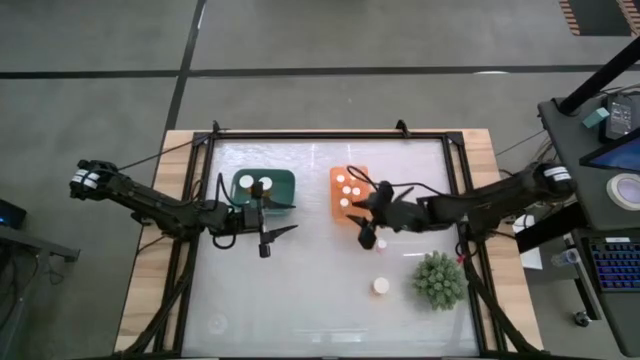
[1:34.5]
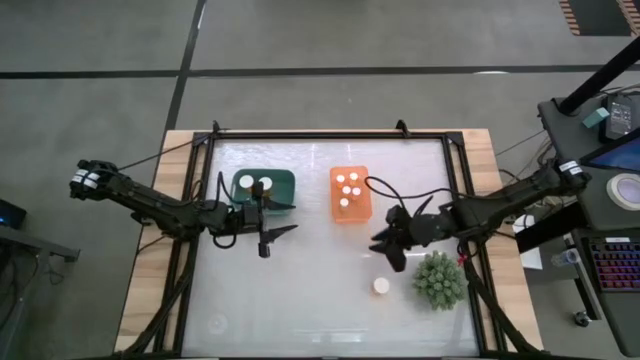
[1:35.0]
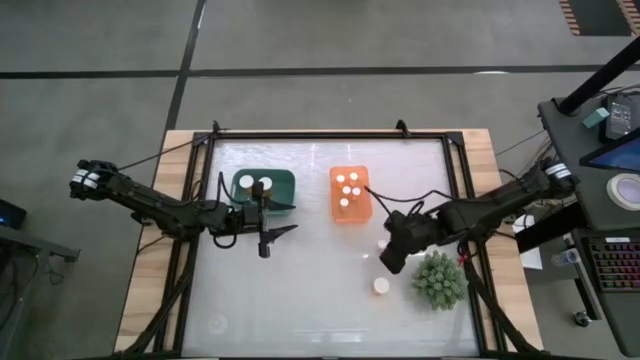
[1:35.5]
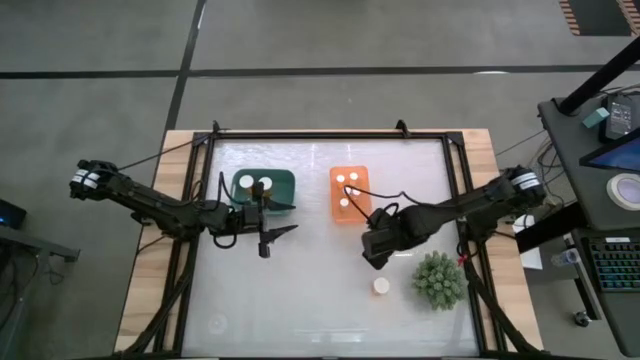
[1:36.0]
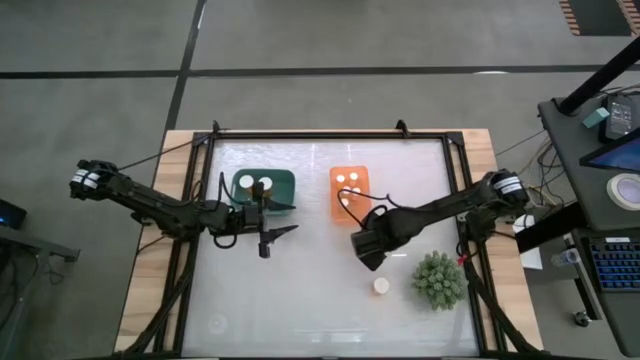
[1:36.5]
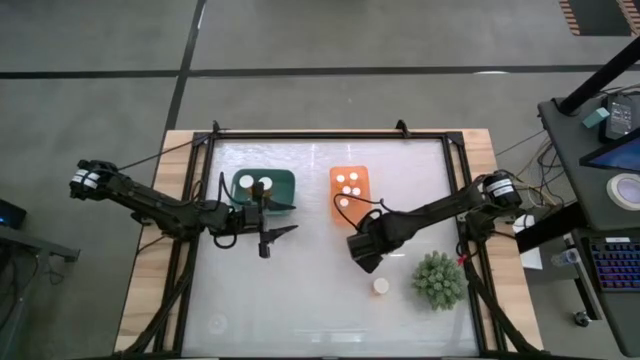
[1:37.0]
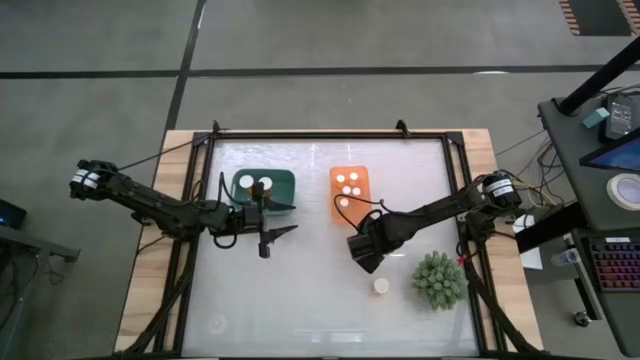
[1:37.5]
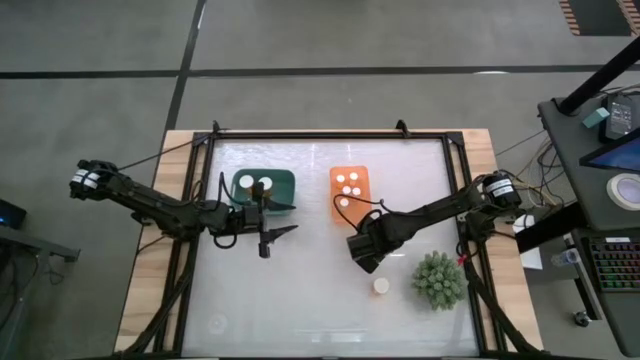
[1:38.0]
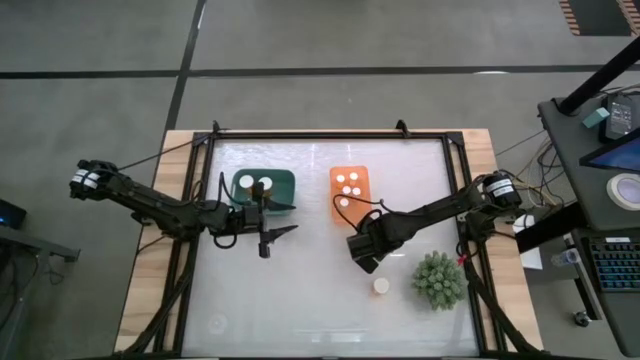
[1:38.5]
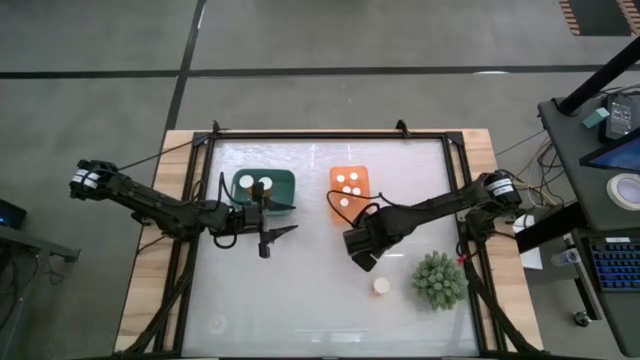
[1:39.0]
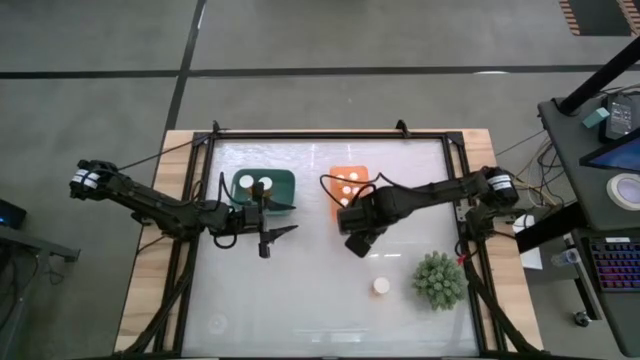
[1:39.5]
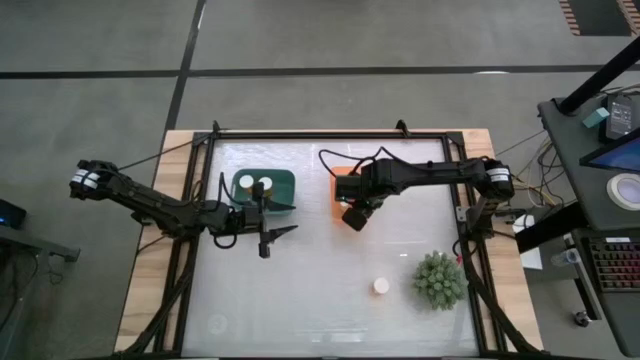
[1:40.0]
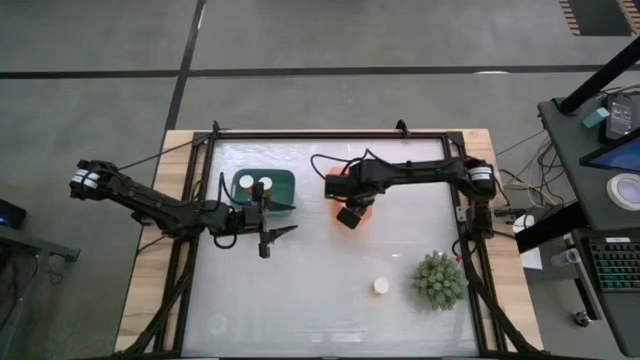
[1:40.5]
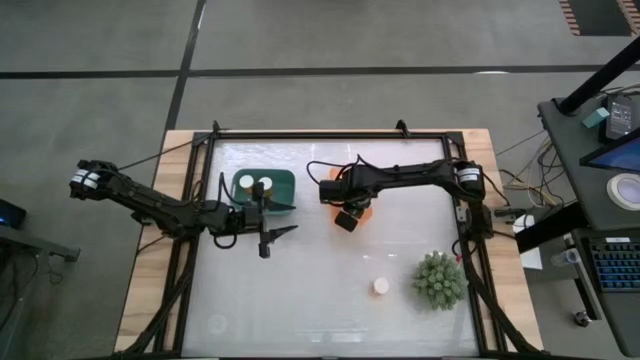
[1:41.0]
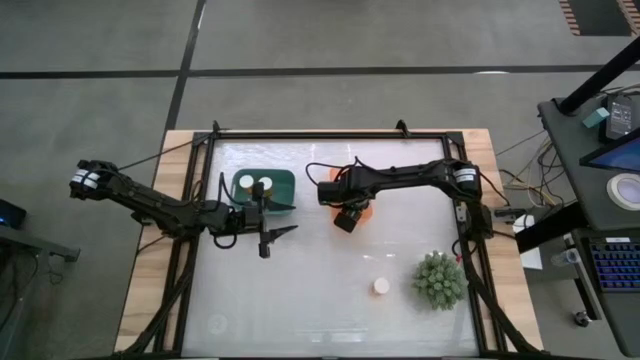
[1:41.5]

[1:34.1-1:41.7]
Task: Pick and place medicine bottles into bin by pill shape (circle, oval)
Put the small pink pill bottle into the orange bin

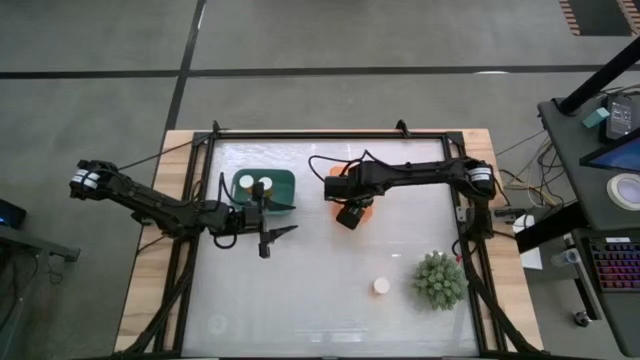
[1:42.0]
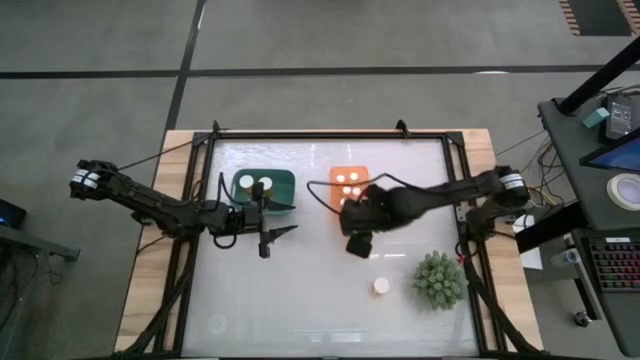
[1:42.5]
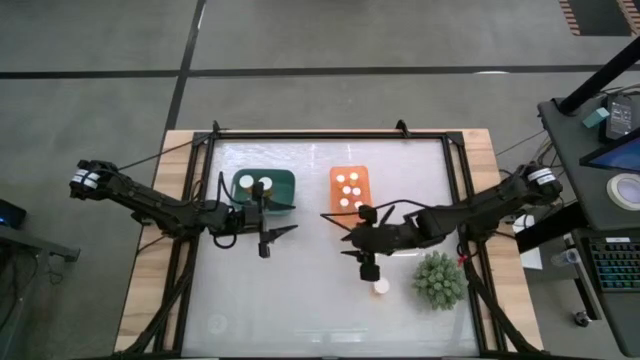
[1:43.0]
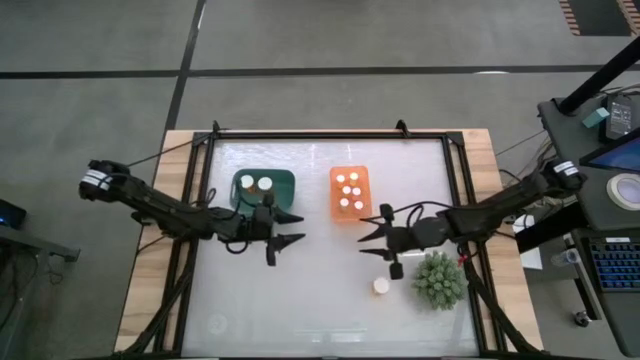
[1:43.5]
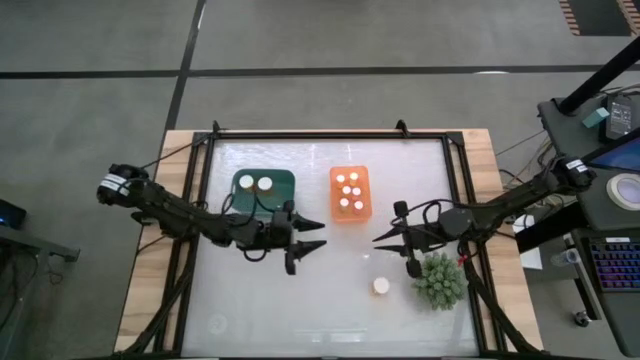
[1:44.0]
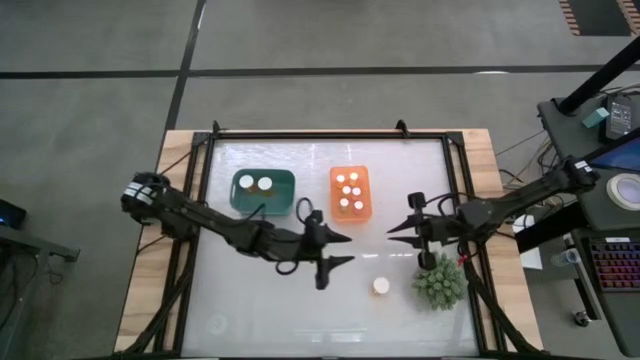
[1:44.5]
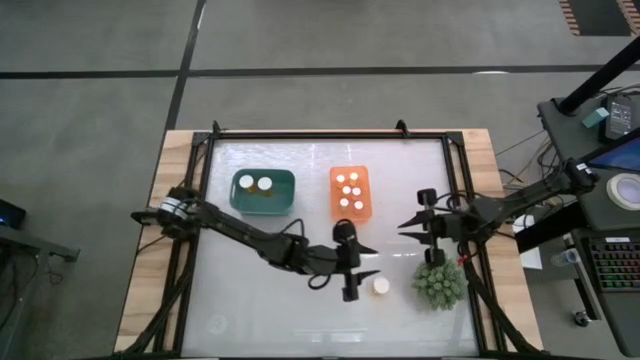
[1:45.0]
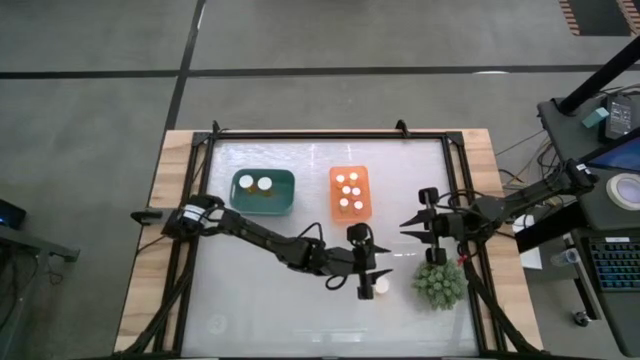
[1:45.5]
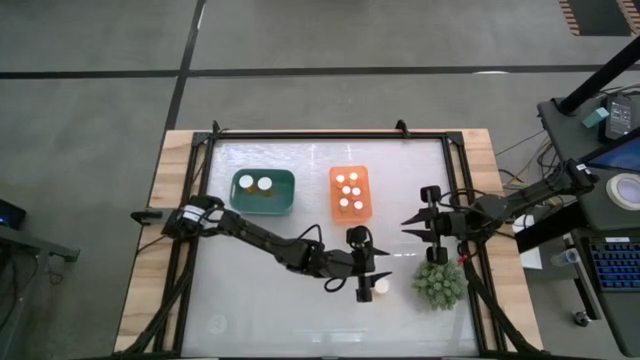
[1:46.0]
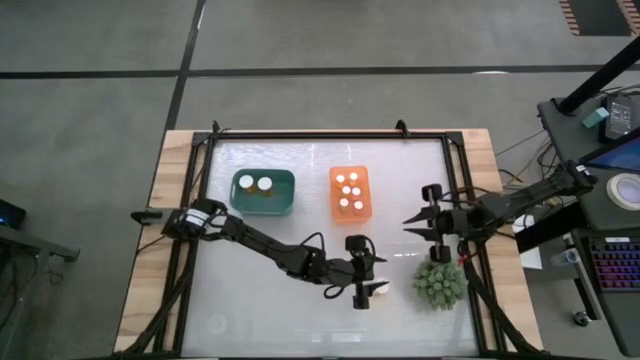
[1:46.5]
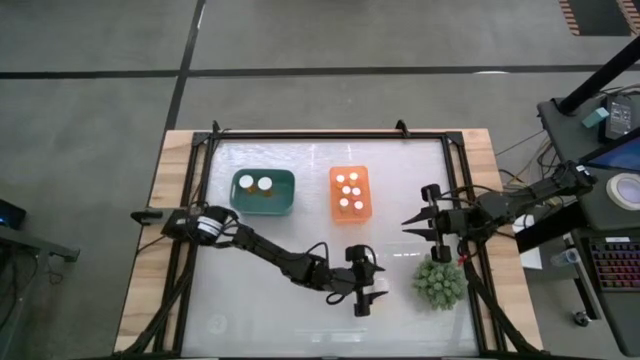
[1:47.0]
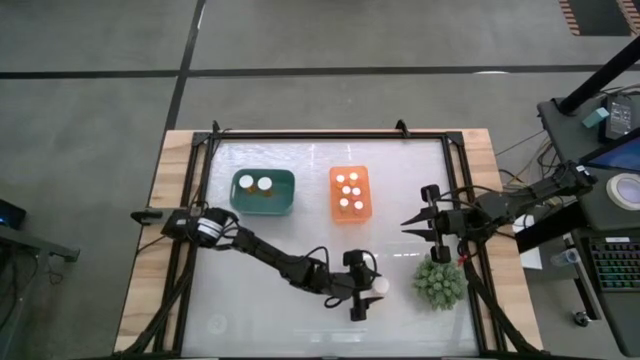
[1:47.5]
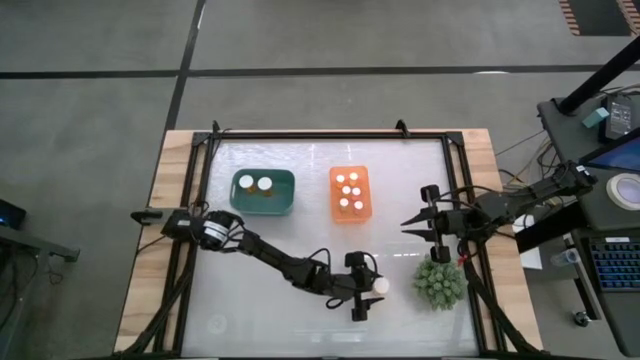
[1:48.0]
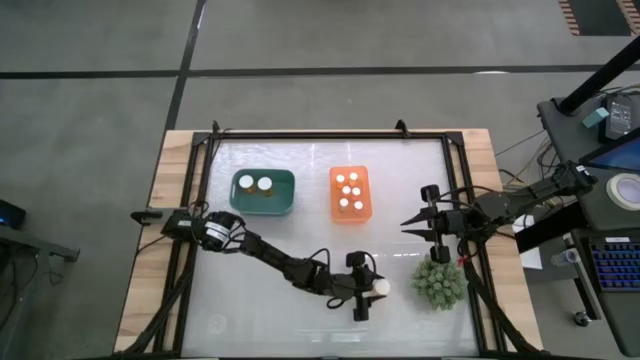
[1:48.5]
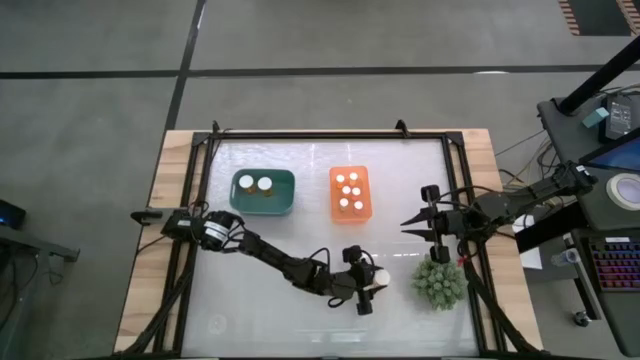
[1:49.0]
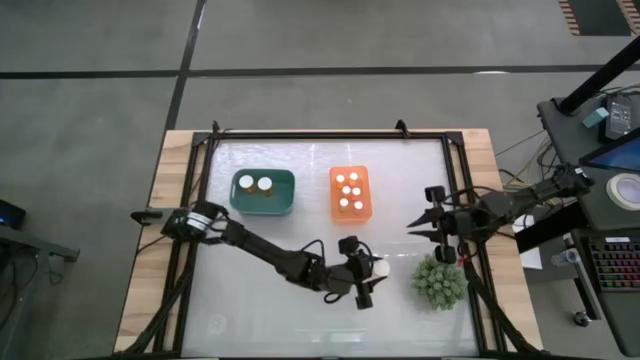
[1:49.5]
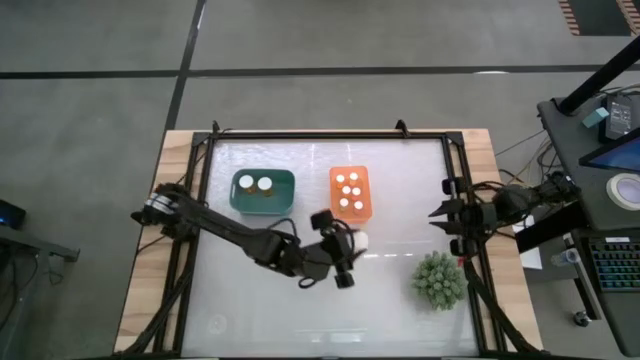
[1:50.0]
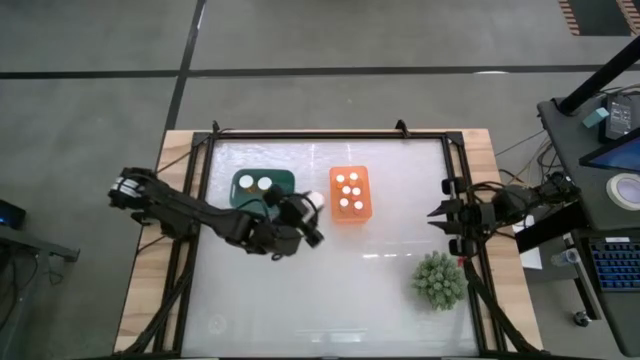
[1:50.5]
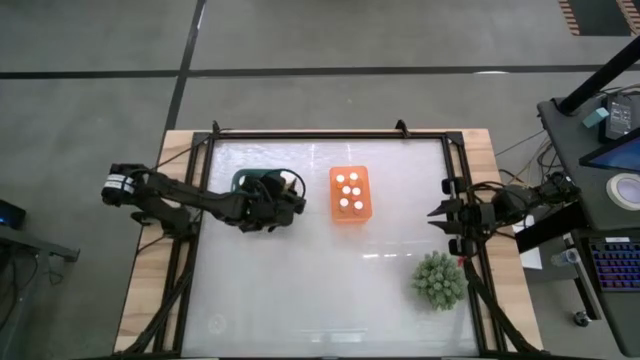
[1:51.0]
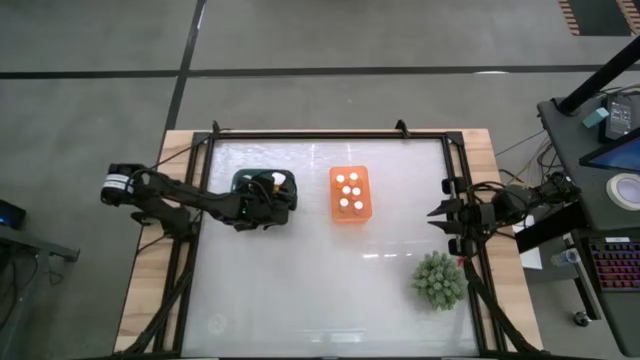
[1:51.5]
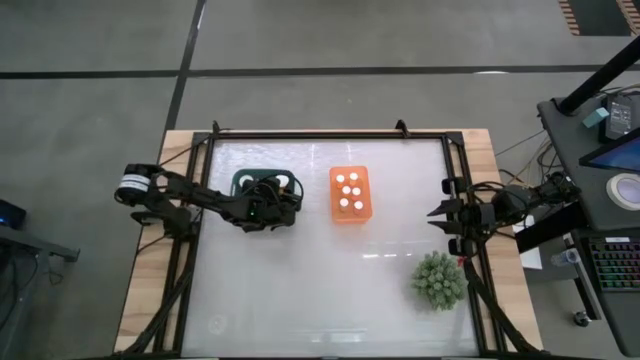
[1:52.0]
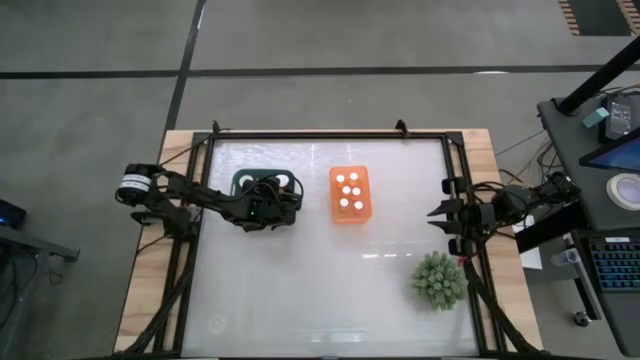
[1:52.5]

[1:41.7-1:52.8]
Put the large orange pill bottle into the green bin

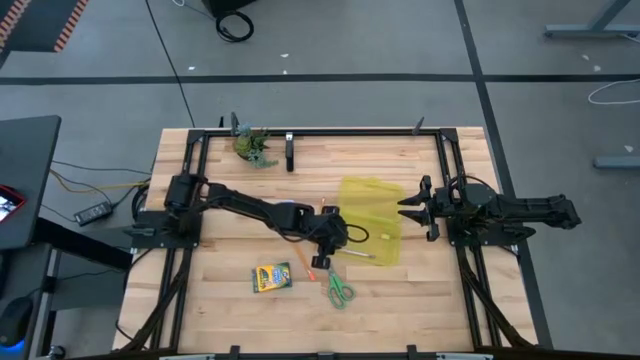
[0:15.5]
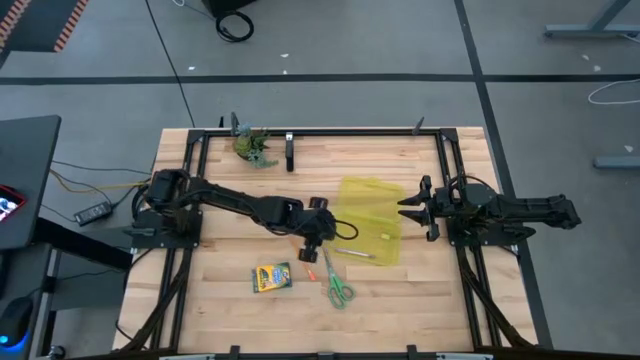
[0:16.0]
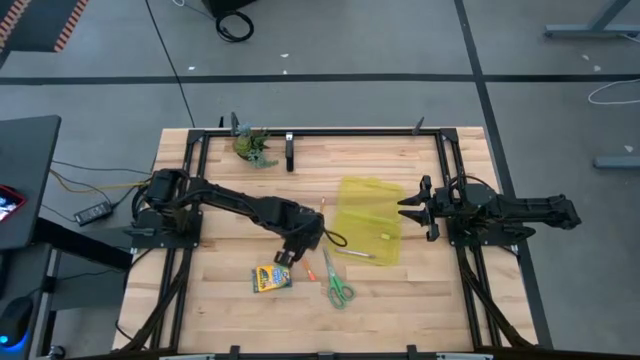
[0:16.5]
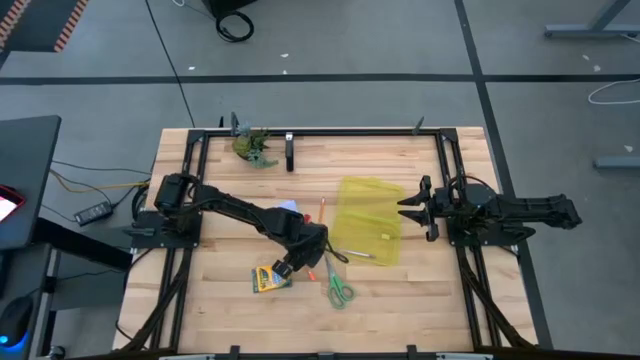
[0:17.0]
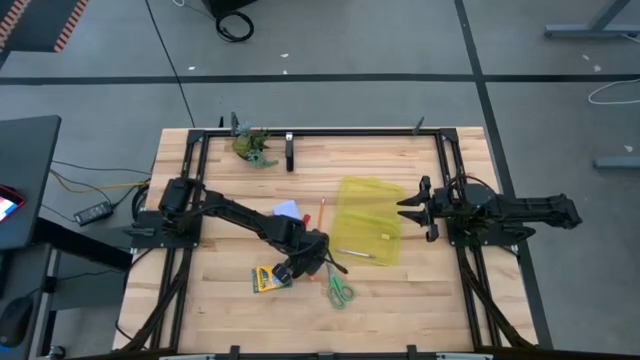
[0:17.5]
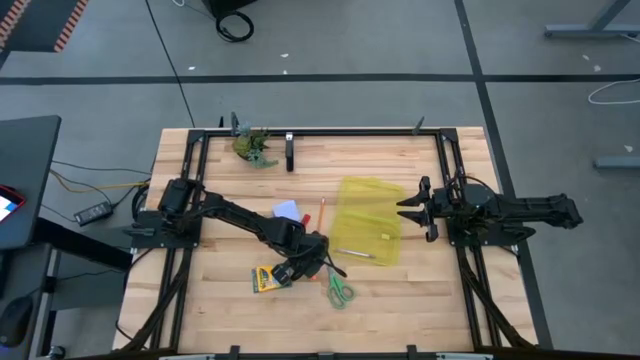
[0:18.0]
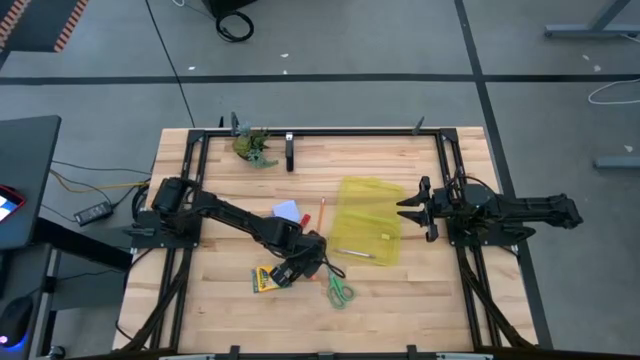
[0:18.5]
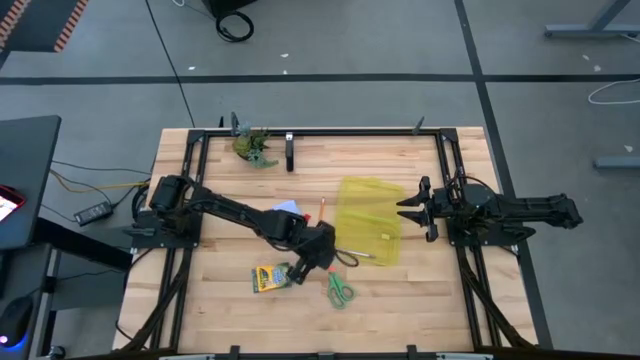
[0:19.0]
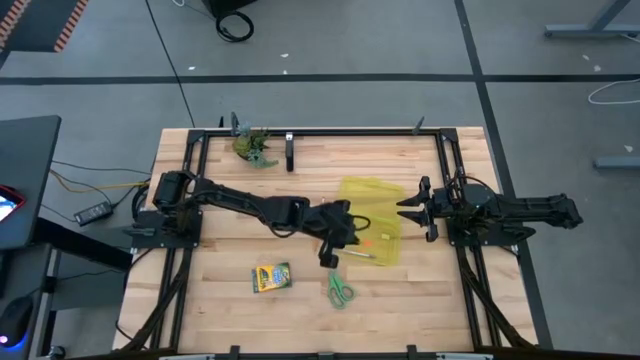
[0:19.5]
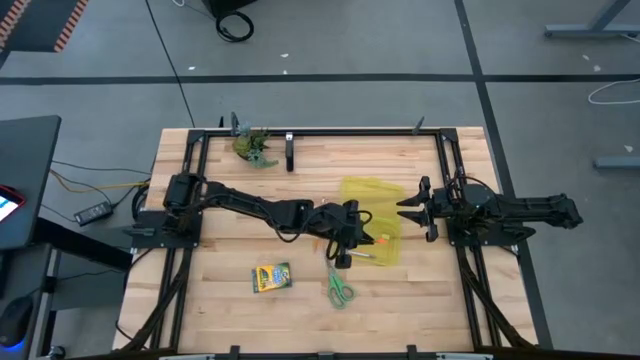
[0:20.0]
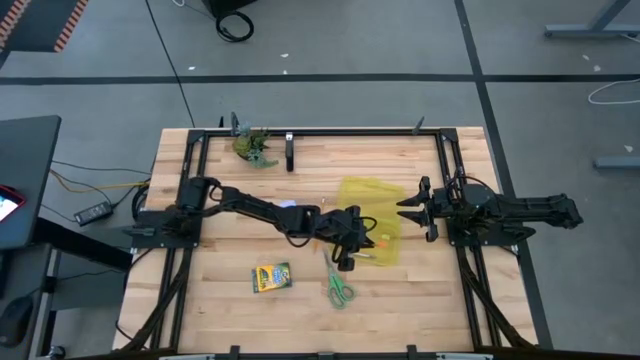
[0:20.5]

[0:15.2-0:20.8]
Task: Pack school essentials
Put the bottom orange pencil into the yellow supply box
